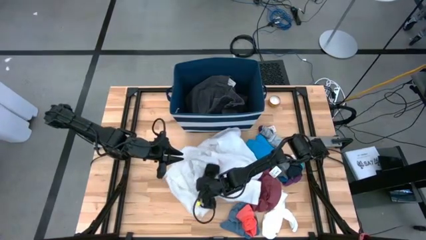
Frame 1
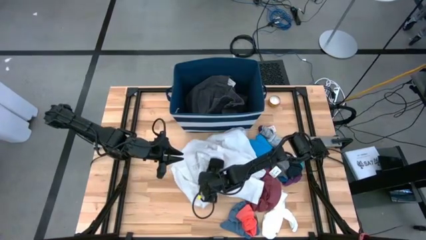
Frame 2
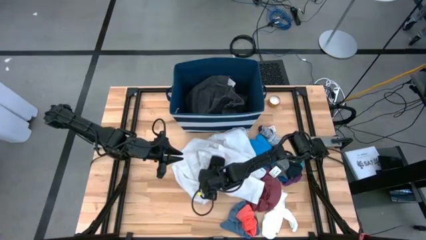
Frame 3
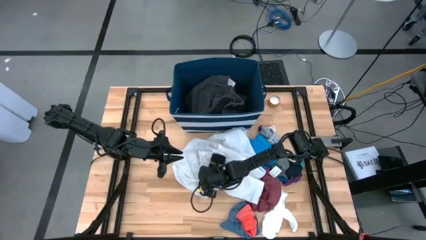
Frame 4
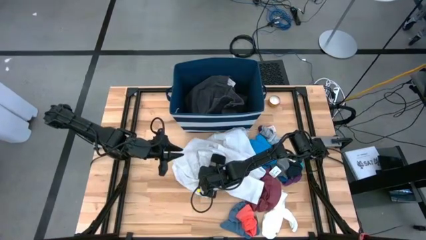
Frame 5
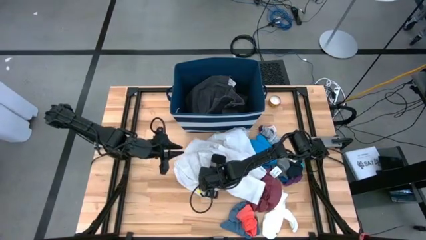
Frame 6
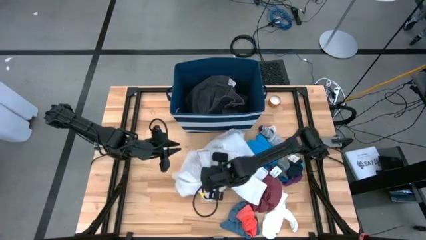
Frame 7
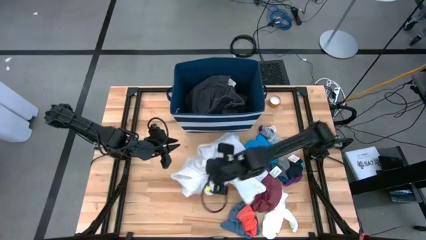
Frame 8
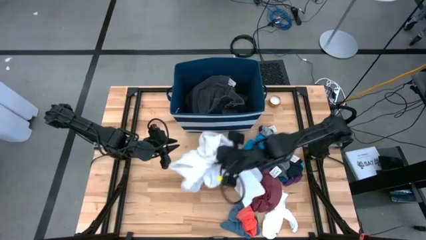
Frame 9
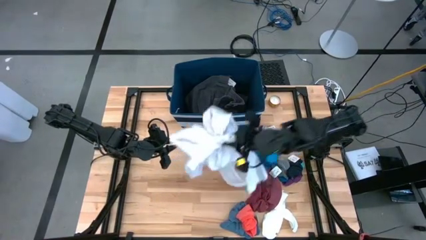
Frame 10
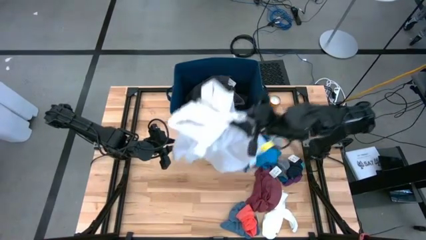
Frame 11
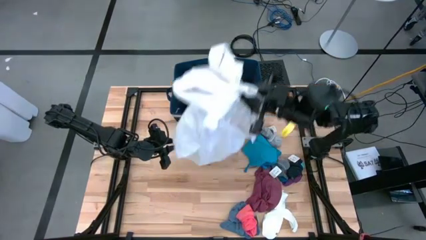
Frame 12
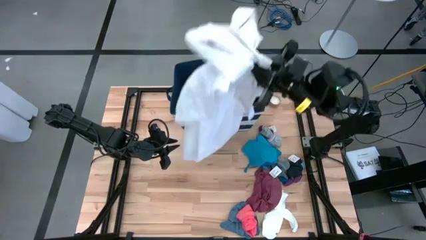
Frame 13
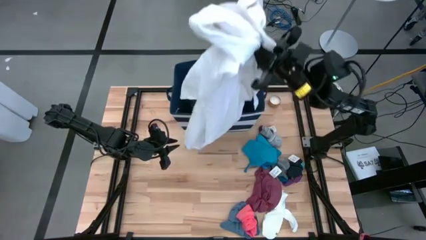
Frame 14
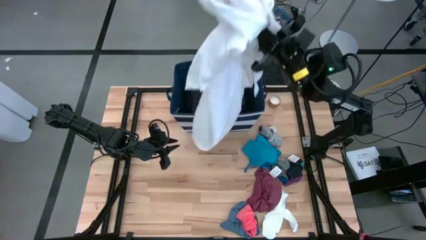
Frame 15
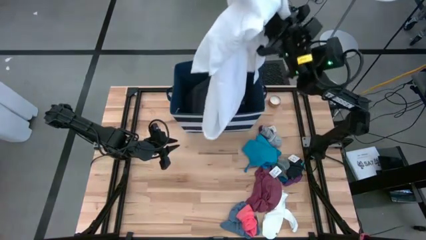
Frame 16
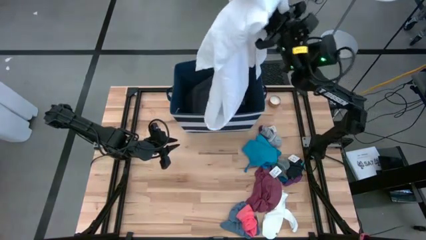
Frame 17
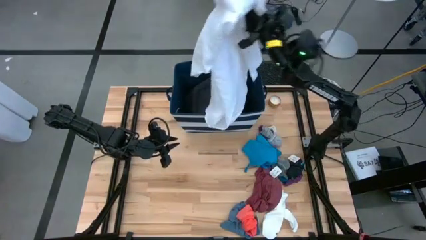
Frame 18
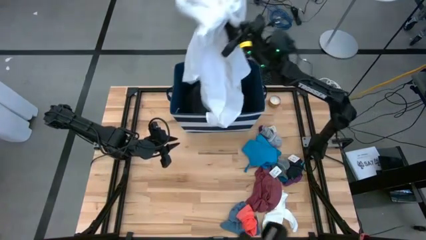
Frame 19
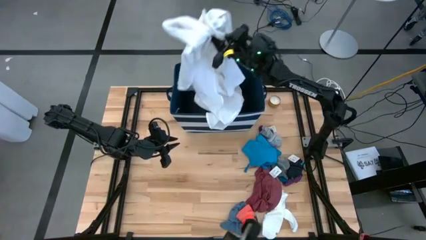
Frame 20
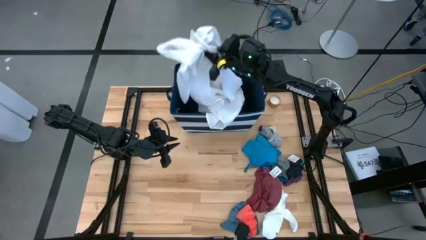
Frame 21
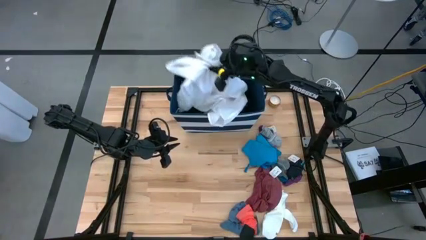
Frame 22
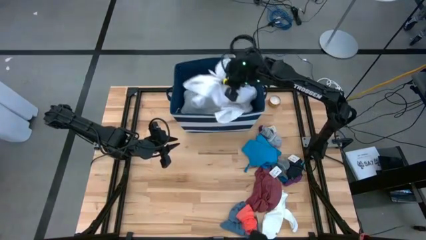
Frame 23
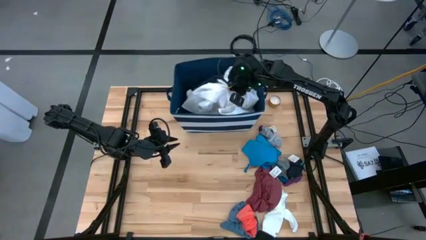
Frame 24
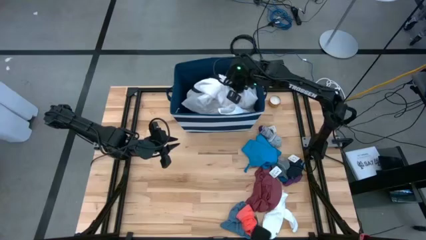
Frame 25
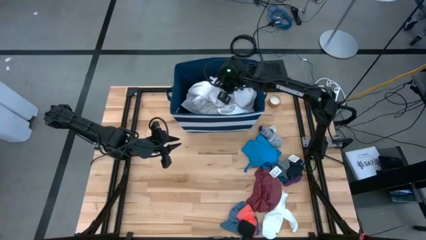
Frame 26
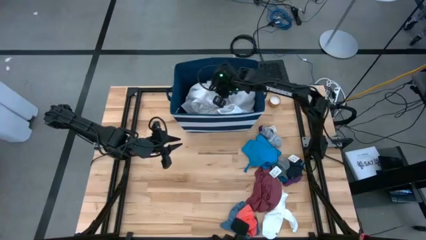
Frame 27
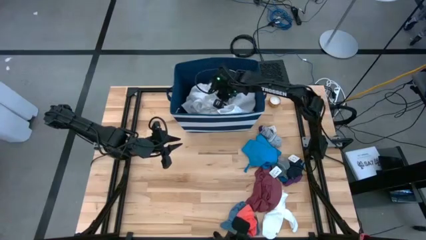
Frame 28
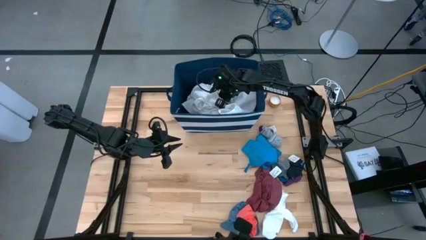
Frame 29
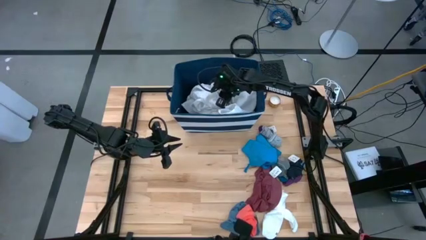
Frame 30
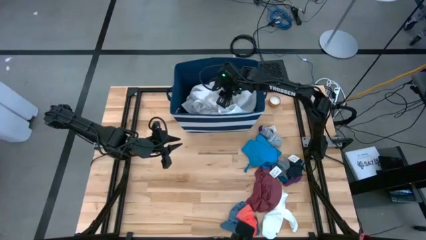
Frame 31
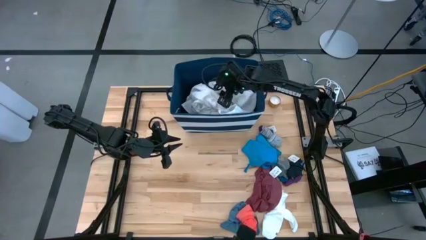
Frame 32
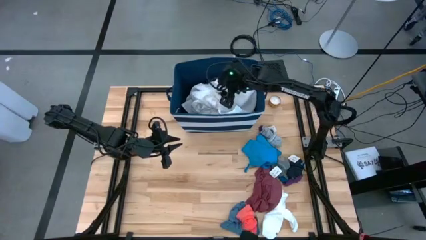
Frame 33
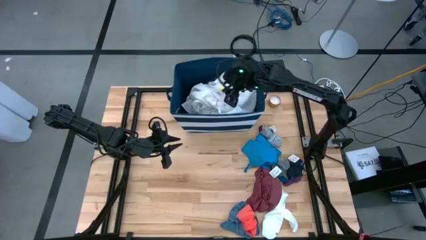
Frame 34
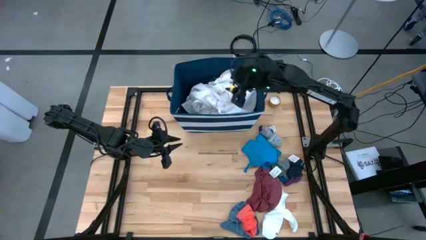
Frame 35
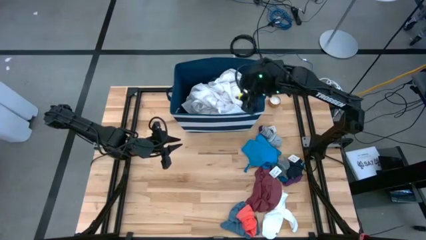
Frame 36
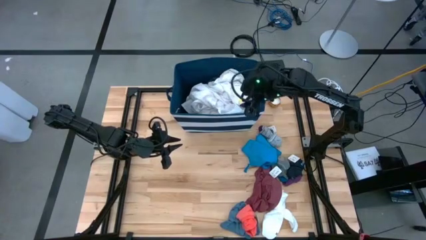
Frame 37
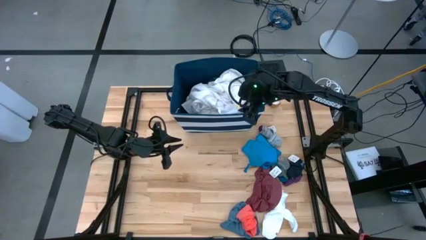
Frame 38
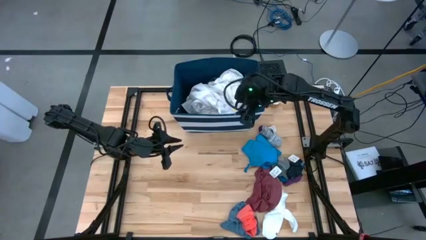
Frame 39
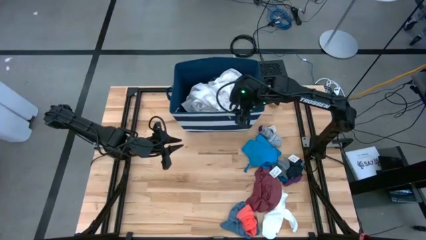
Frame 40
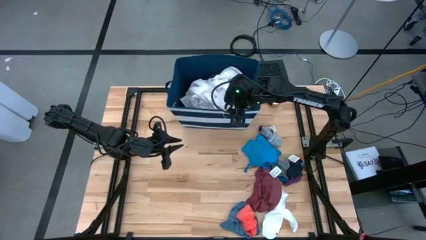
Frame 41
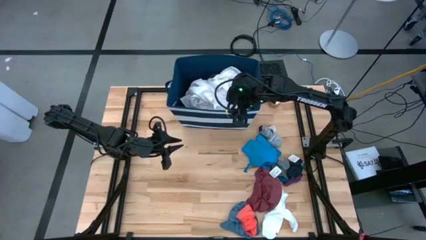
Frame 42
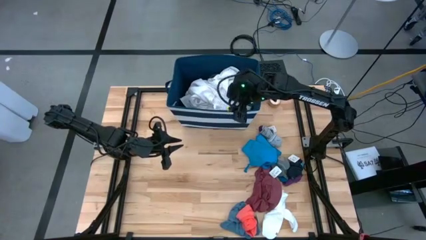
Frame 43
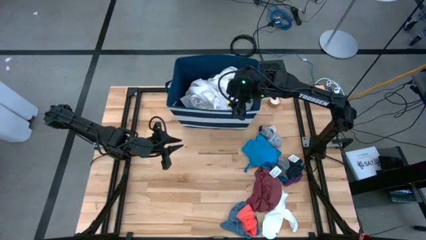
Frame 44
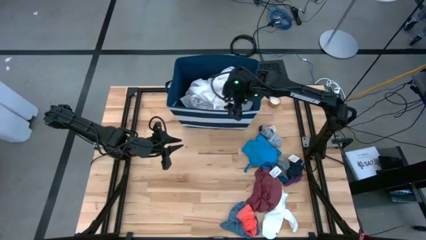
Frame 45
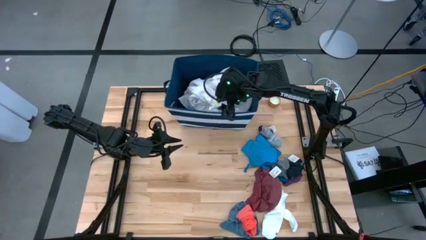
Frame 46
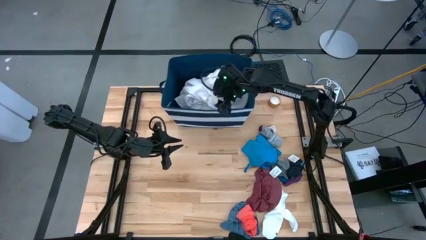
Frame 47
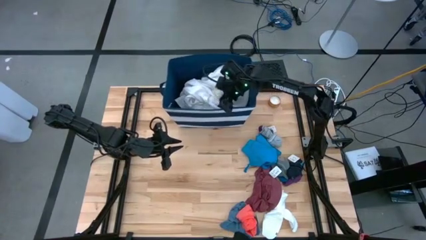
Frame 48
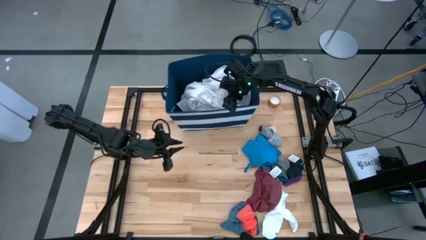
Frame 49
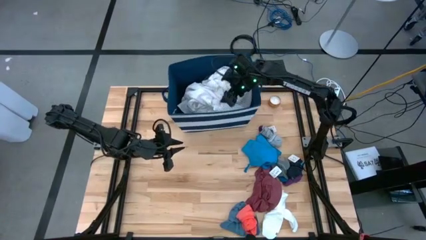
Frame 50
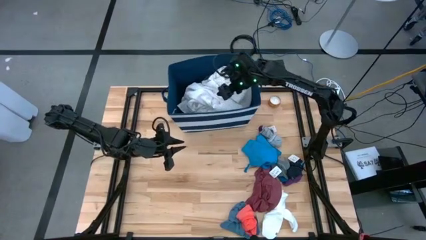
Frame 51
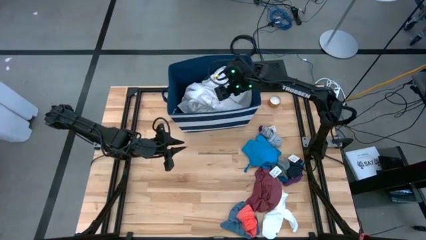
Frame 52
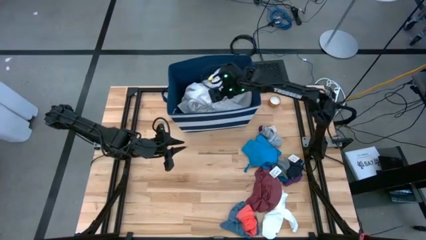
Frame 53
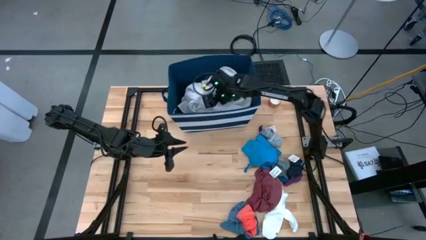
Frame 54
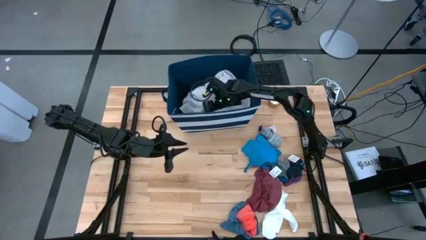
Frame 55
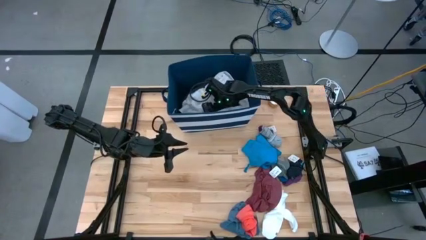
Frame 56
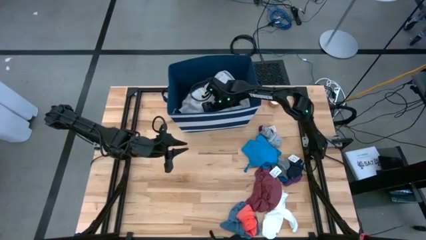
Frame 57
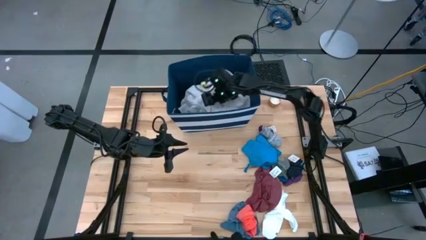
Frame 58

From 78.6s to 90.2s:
Task: Sort clothes
Put the white polo shirt into the blue laundry organizer
